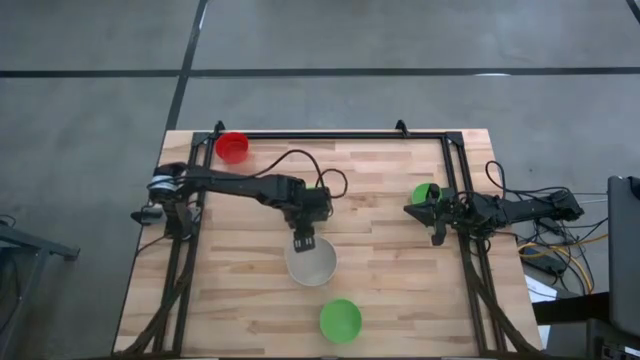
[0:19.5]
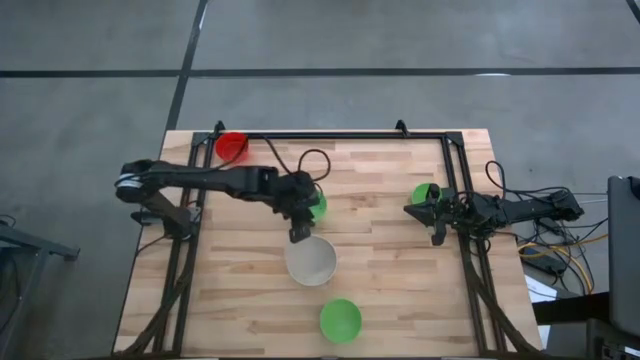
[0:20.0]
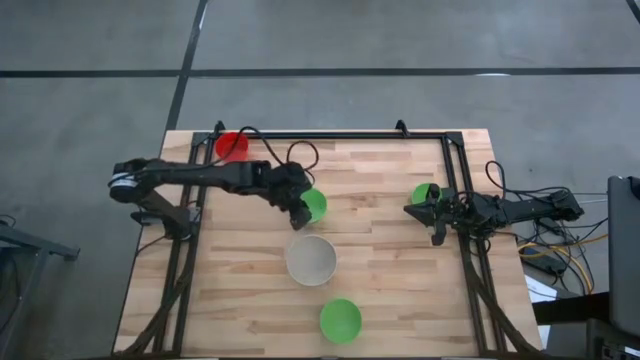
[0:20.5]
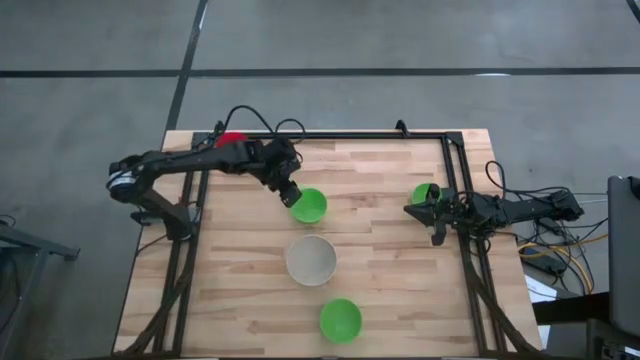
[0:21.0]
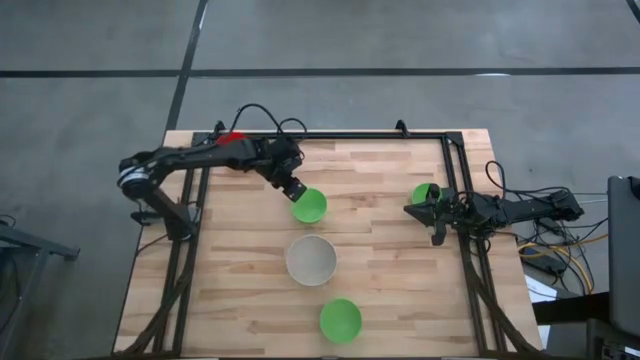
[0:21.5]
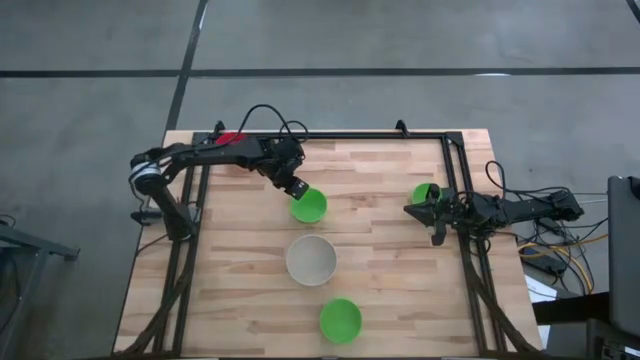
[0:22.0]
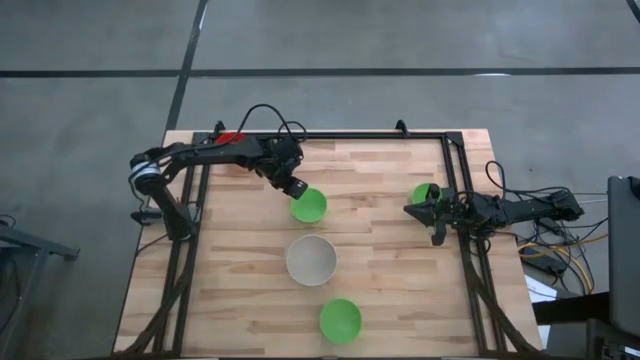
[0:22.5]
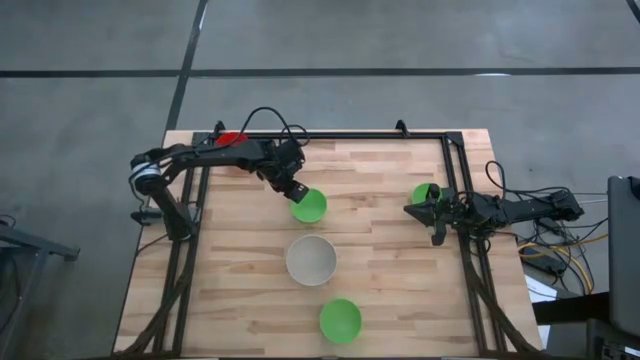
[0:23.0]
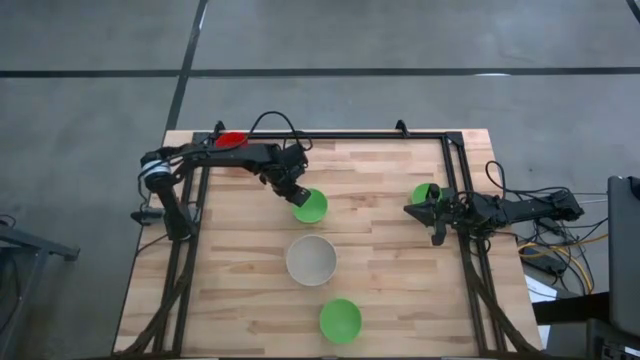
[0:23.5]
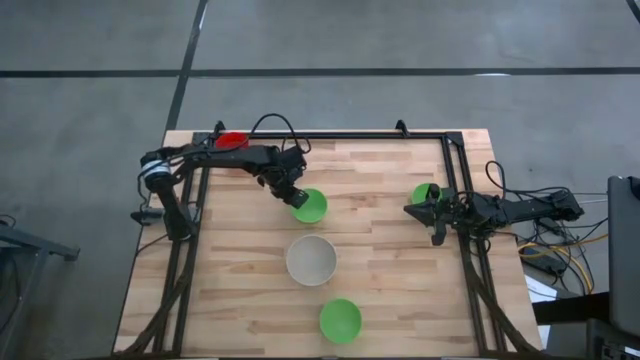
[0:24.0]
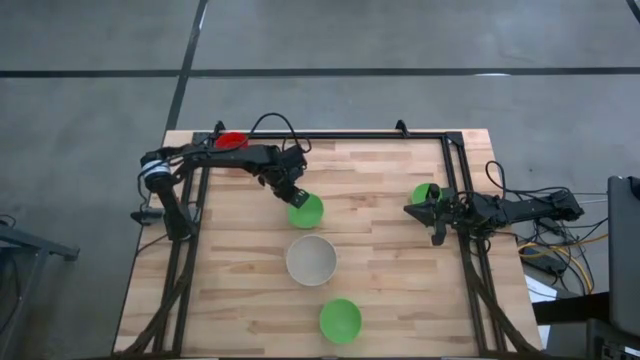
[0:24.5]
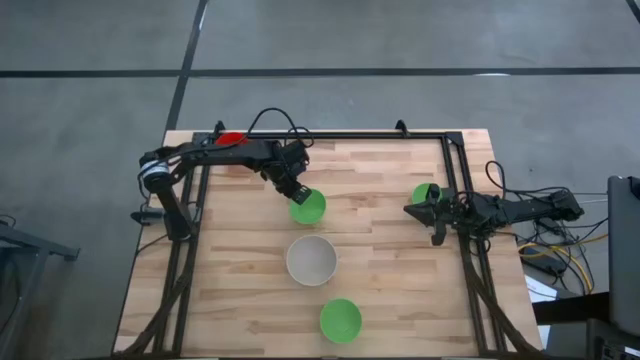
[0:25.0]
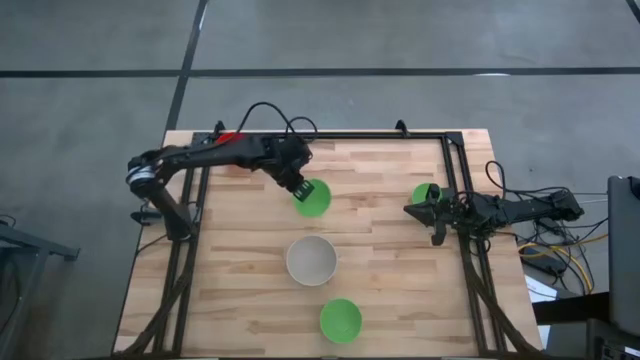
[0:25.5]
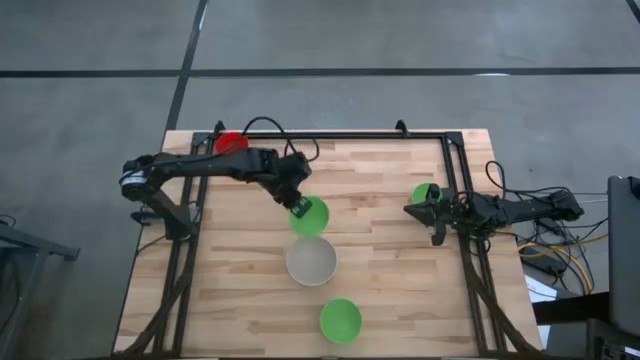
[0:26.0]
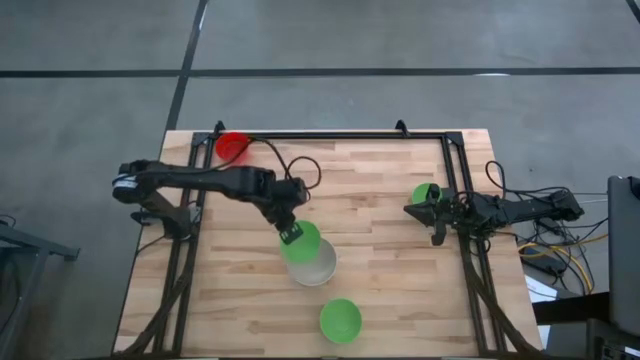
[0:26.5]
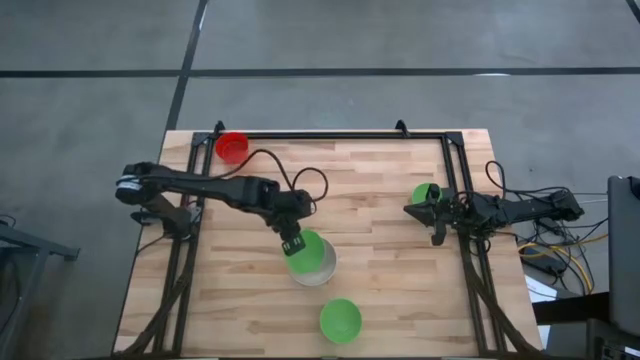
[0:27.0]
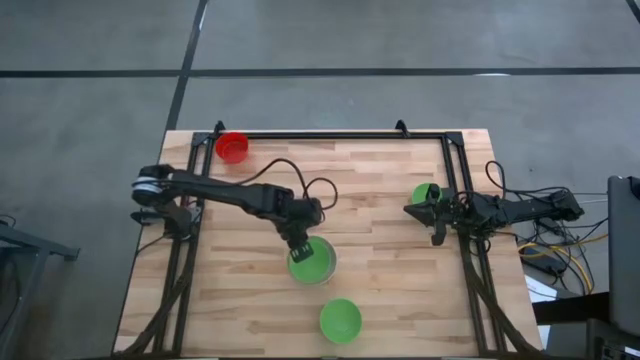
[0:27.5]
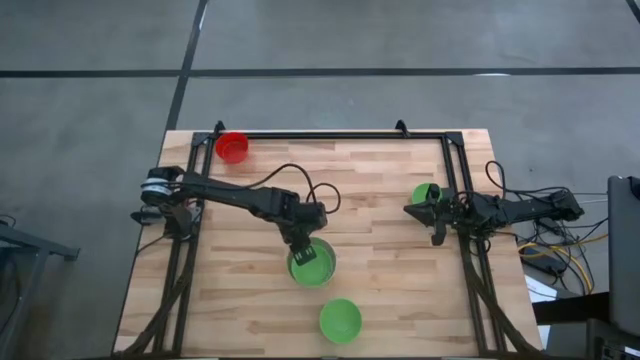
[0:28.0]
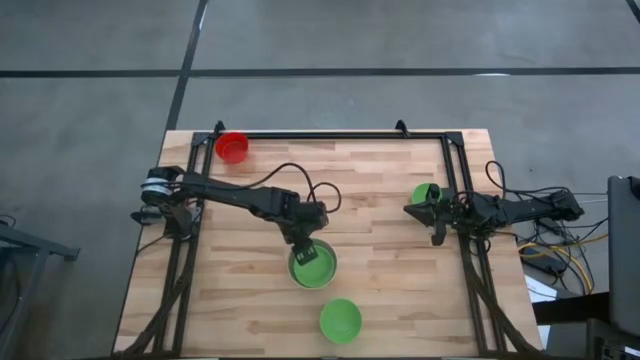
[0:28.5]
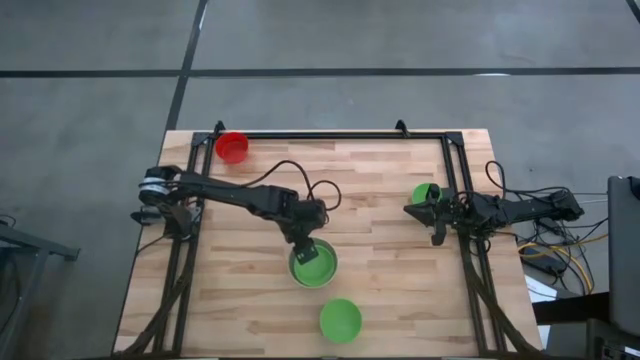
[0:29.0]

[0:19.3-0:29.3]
Stack the top left green bowl on the gray bowl

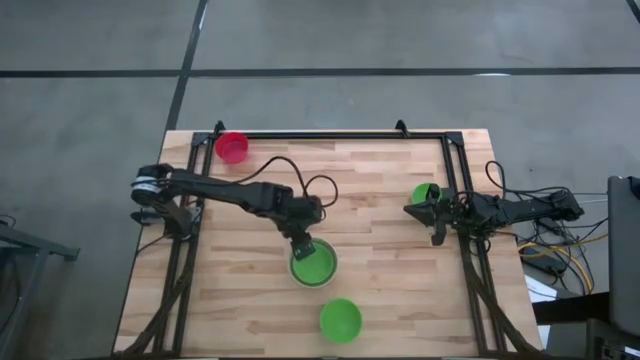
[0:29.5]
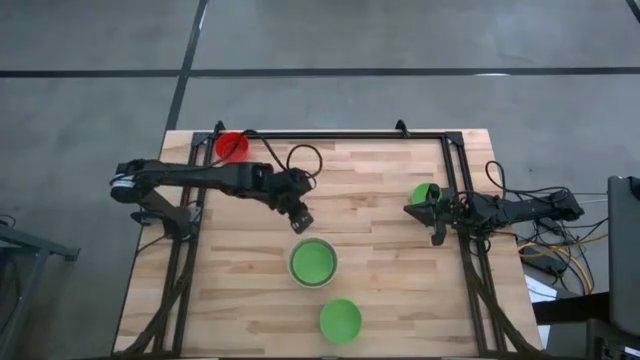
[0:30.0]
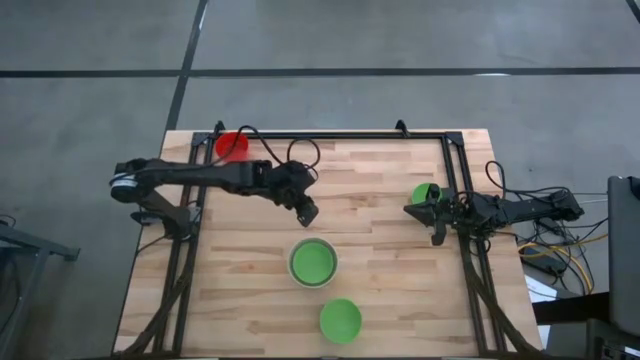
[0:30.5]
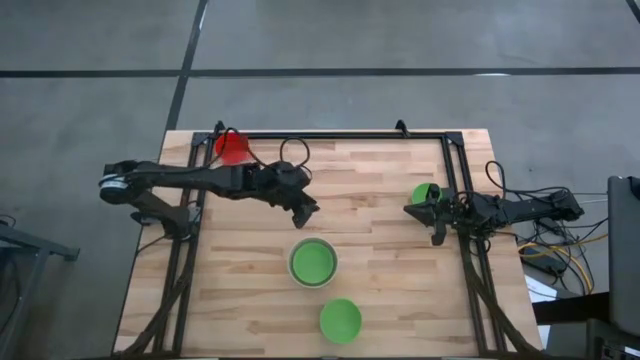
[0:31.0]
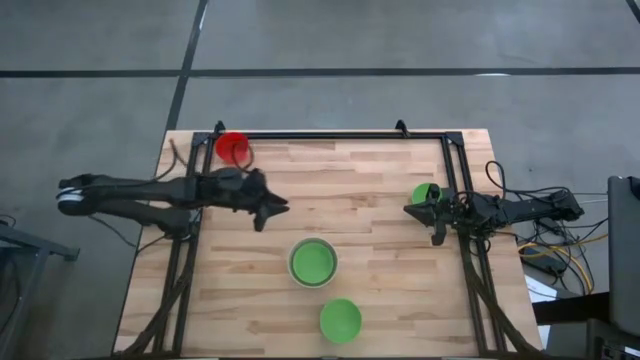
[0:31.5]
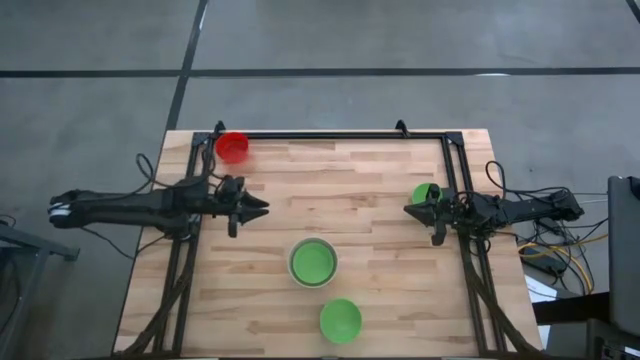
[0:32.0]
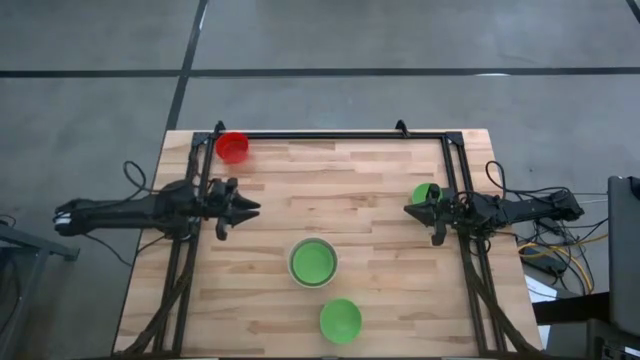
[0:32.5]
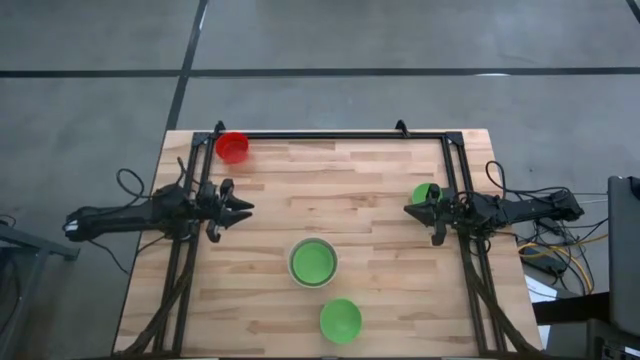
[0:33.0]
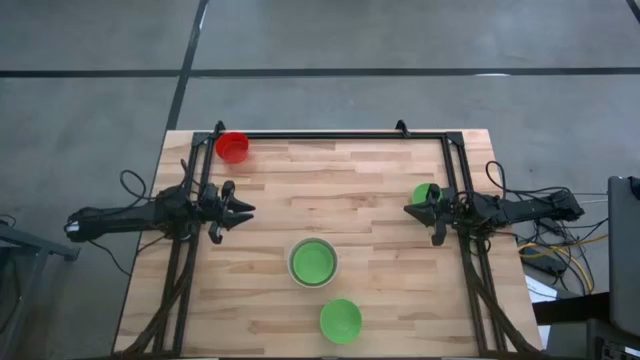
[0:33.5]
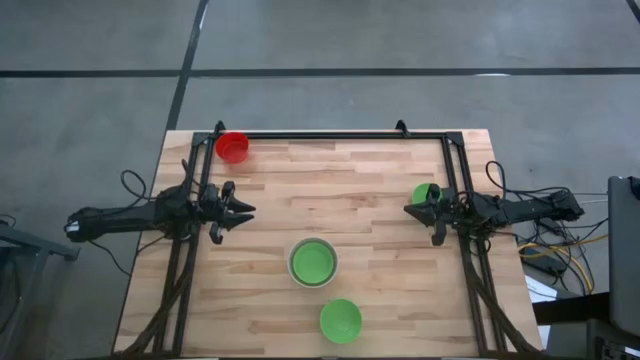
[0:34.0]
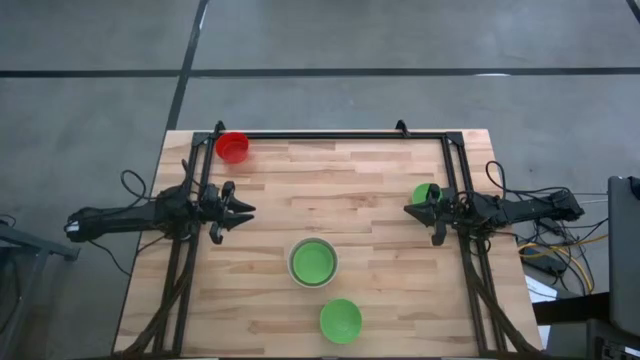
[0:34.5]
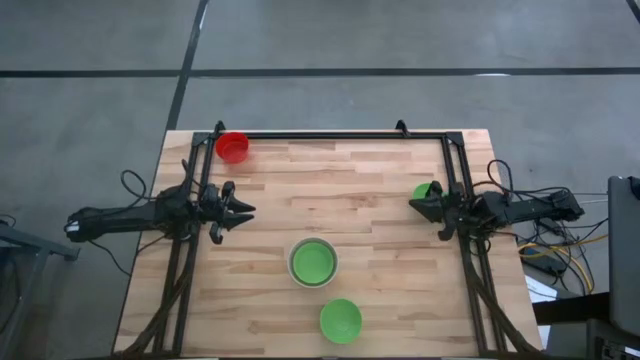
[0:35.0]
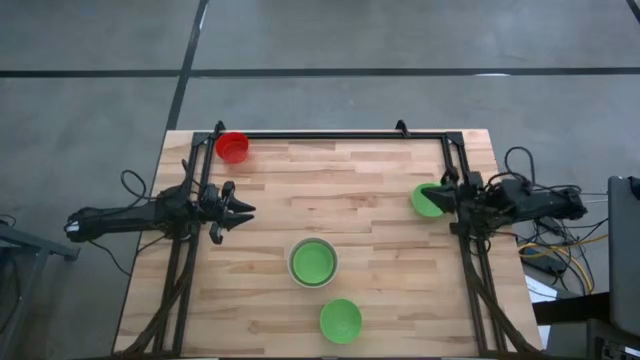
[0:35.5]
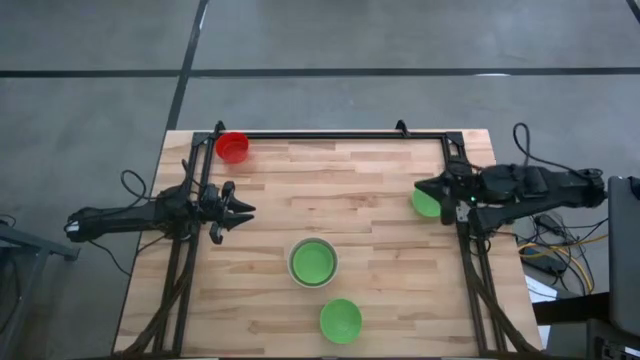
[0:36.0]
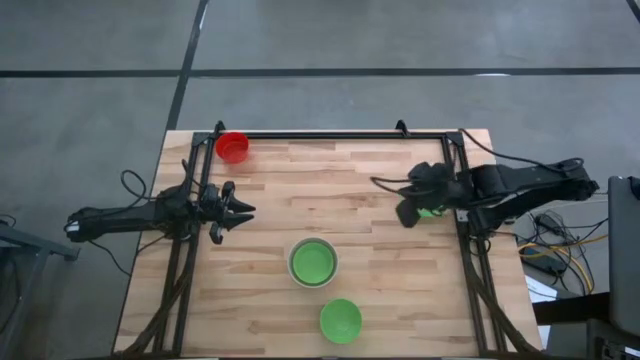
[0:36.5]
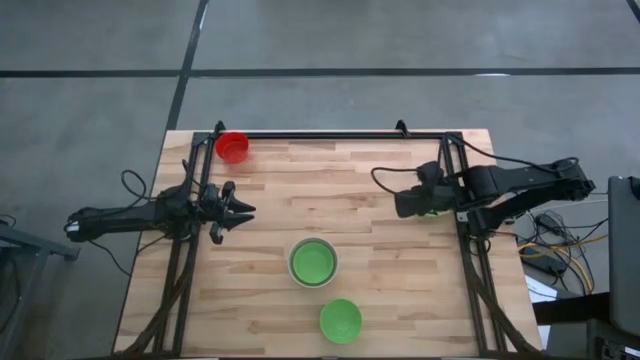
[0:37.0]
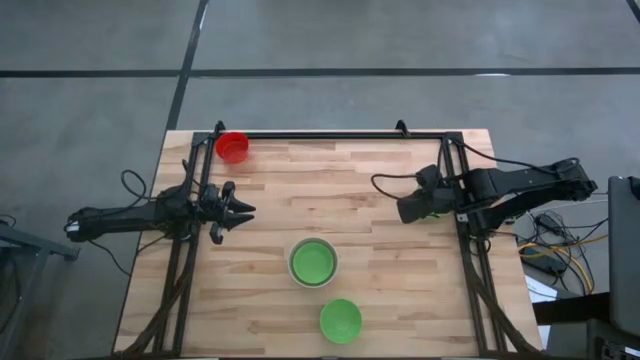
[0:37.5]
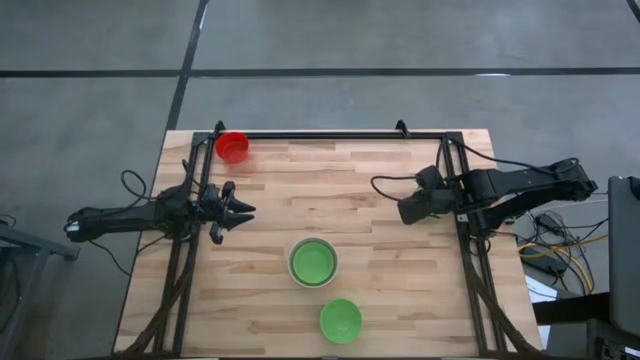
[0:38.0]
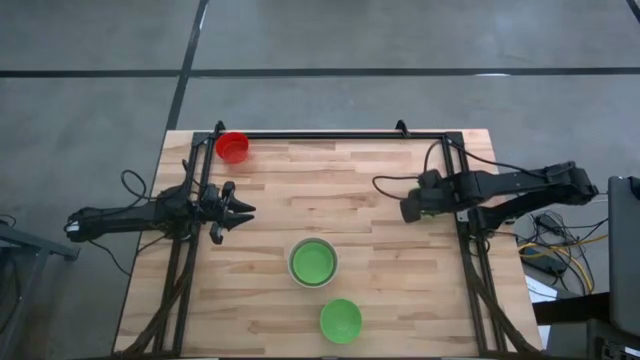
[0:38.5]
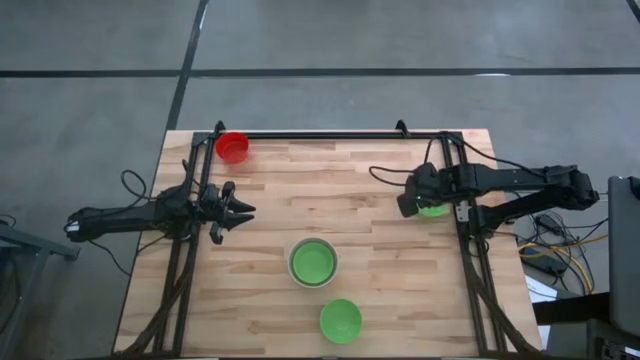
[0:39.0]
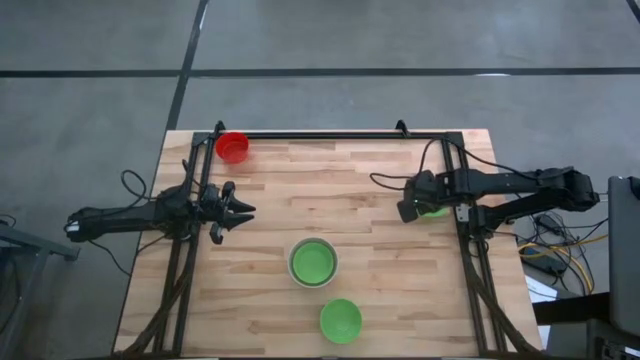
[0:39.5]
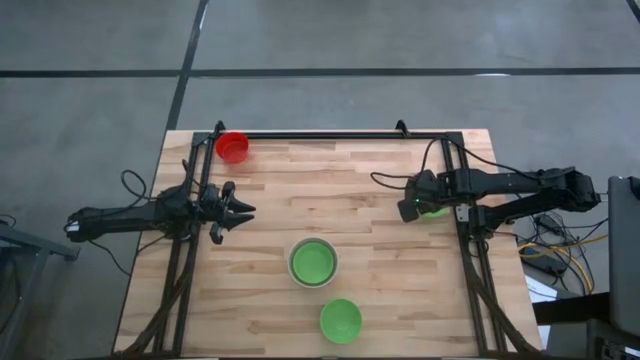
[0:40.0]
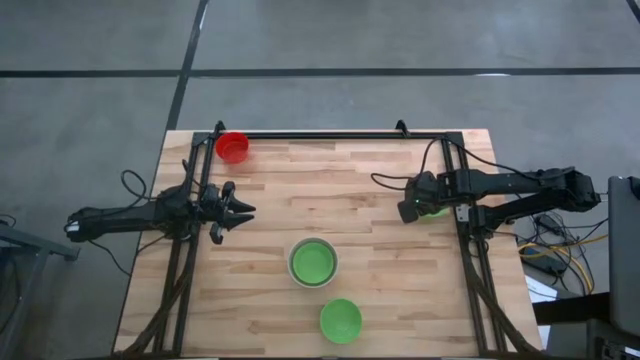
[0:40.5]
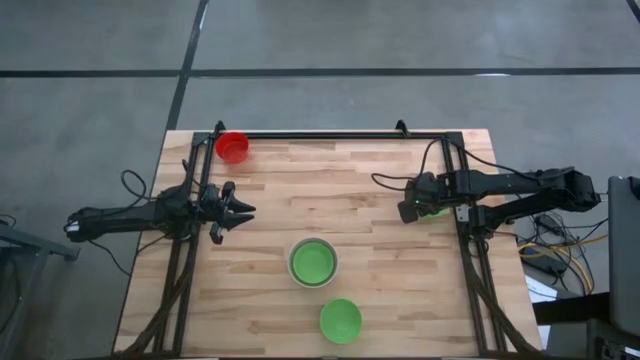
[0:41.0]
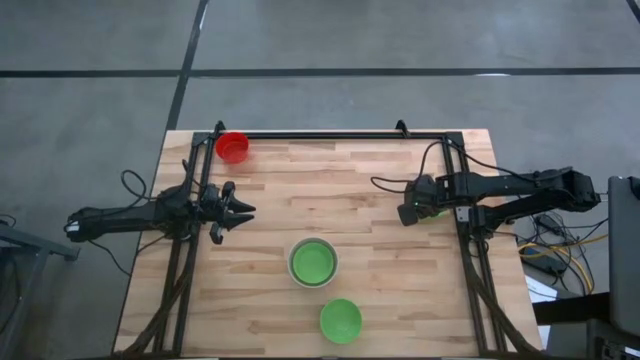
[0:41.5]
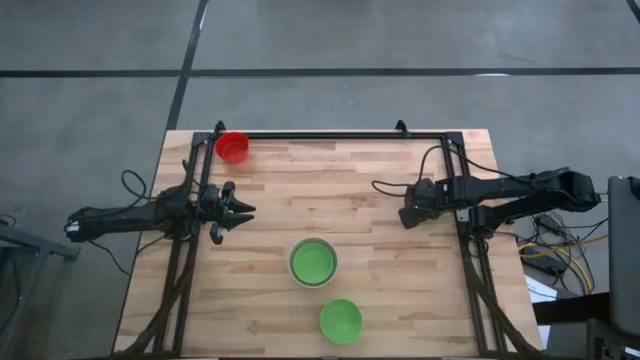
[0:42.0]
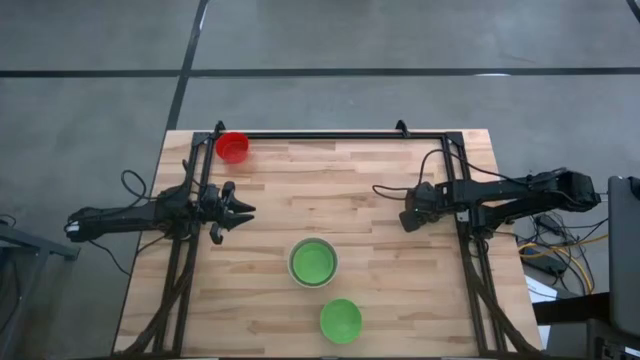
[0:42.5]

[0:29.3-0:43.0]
Stack the top green bowl on the green bowl
